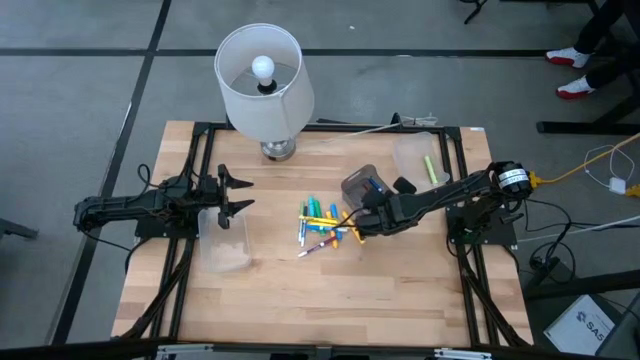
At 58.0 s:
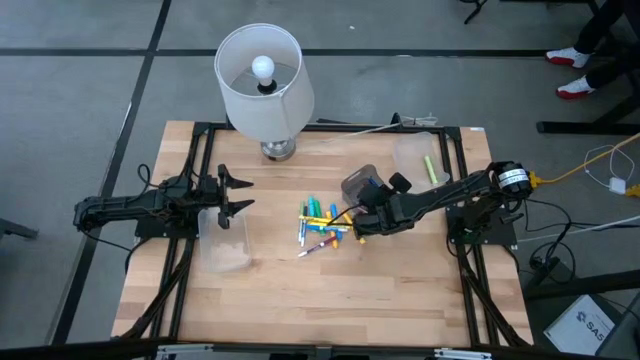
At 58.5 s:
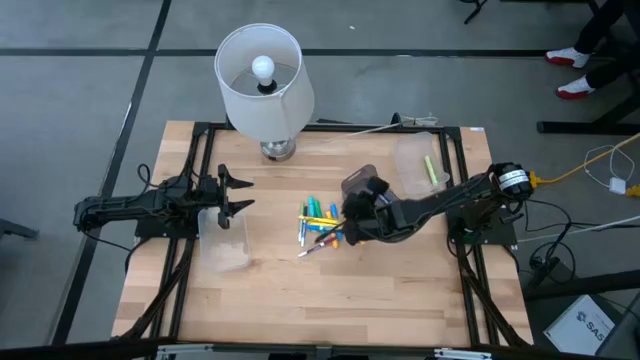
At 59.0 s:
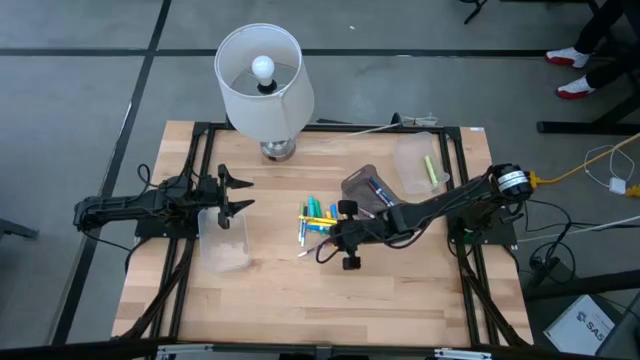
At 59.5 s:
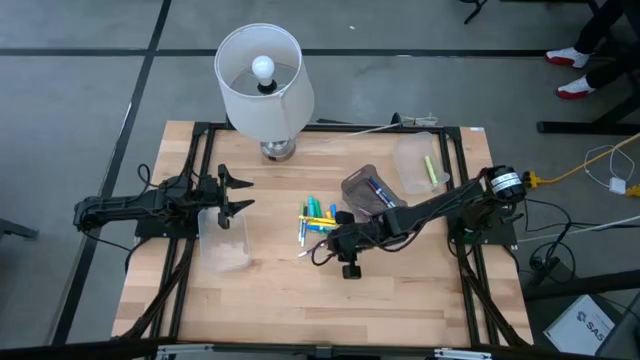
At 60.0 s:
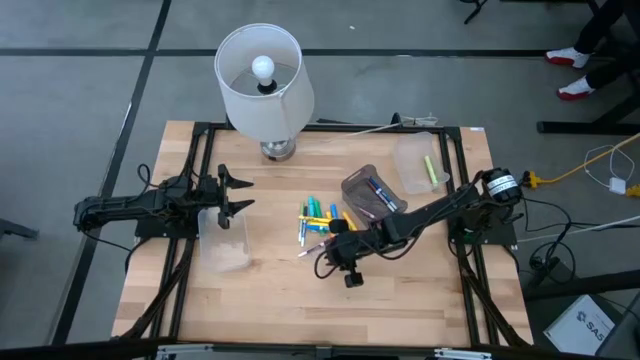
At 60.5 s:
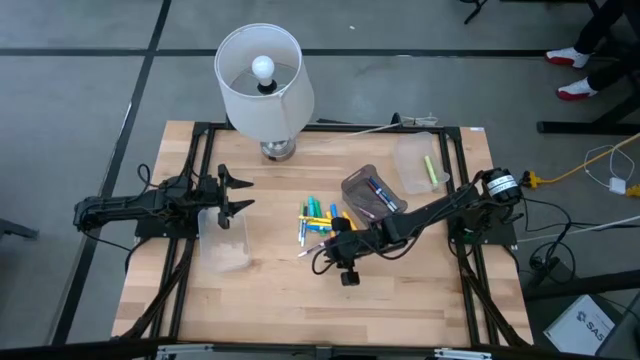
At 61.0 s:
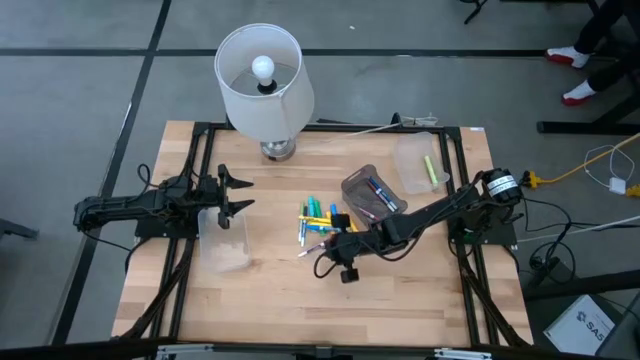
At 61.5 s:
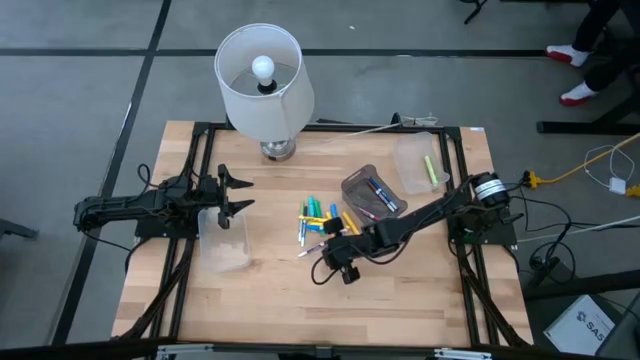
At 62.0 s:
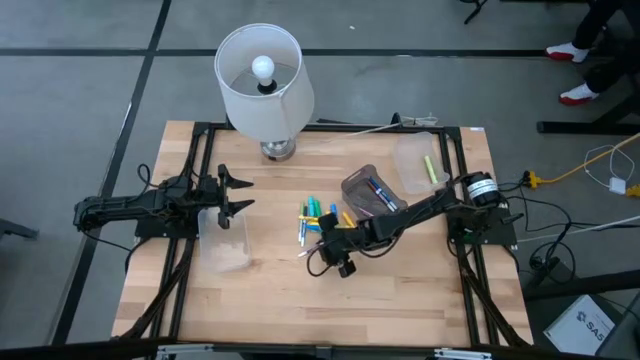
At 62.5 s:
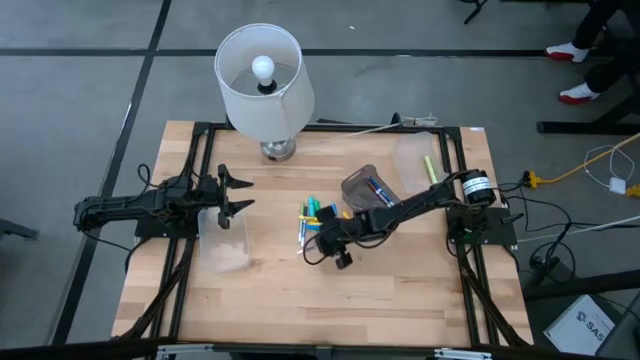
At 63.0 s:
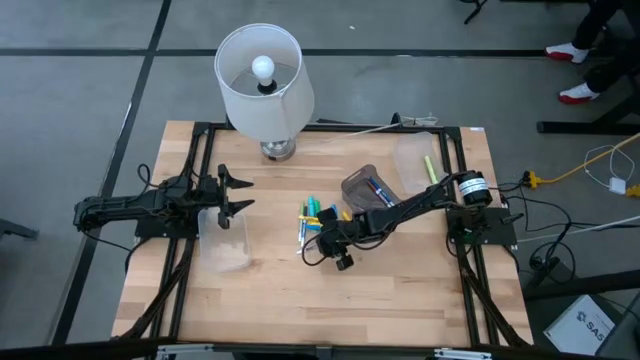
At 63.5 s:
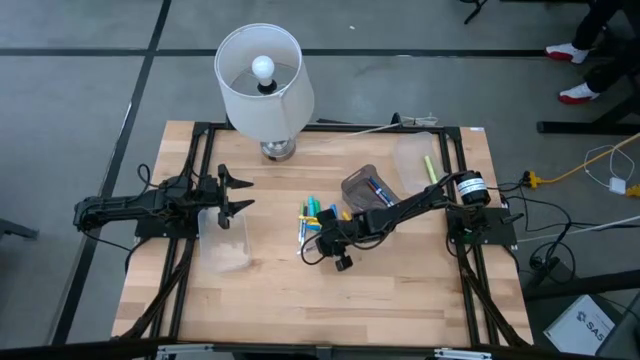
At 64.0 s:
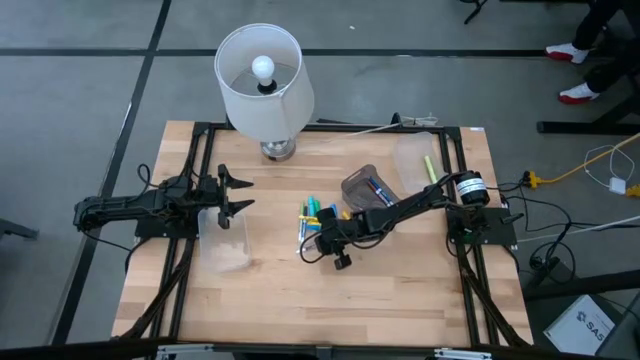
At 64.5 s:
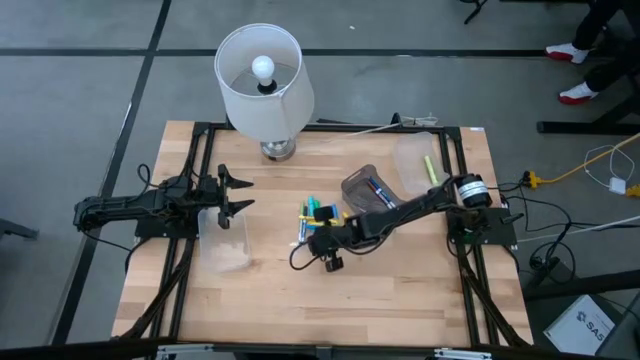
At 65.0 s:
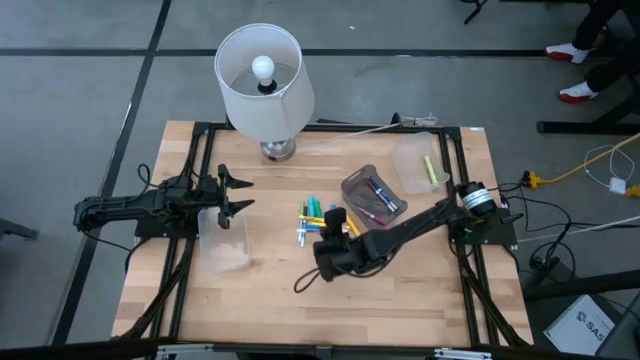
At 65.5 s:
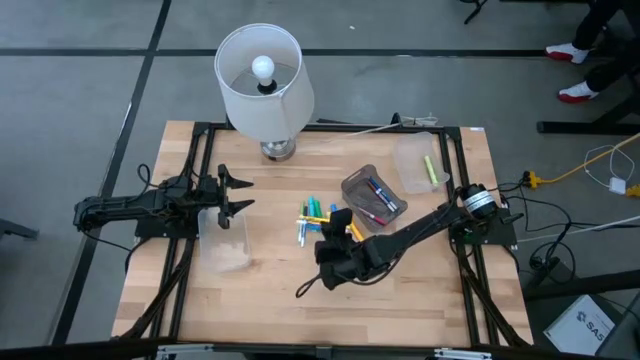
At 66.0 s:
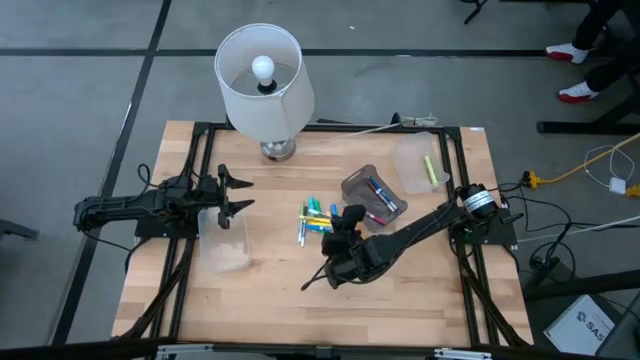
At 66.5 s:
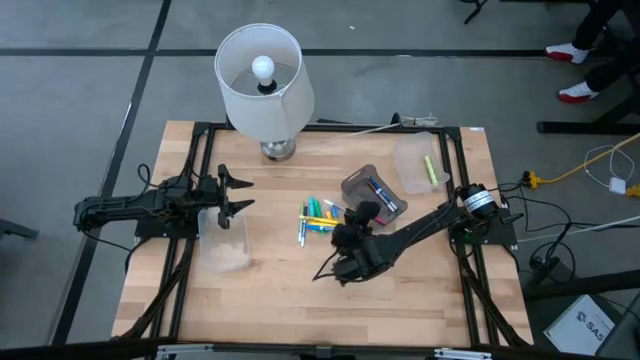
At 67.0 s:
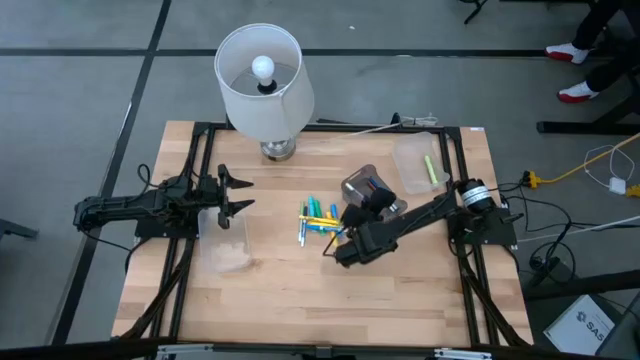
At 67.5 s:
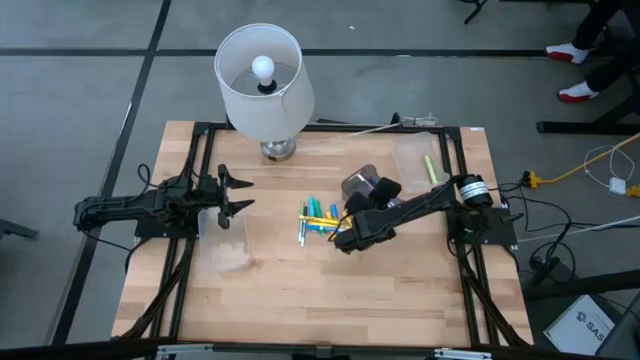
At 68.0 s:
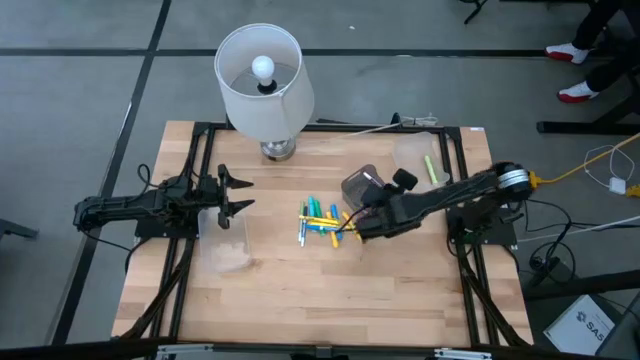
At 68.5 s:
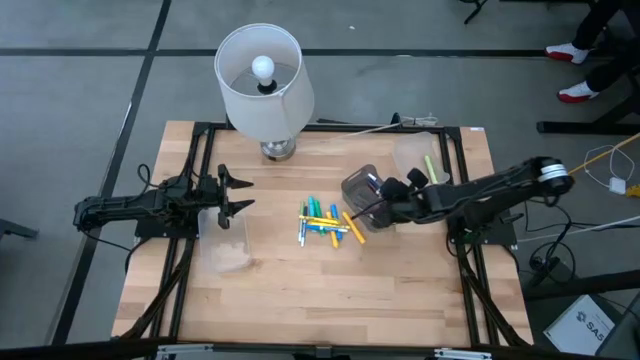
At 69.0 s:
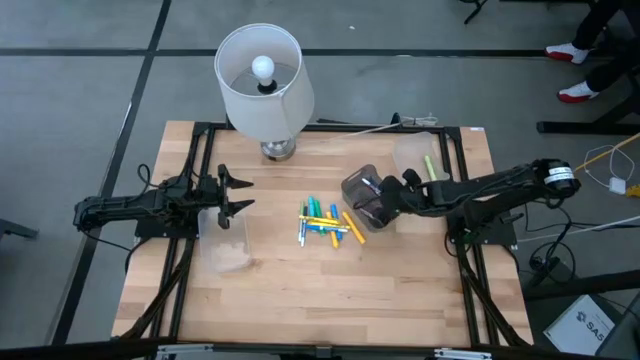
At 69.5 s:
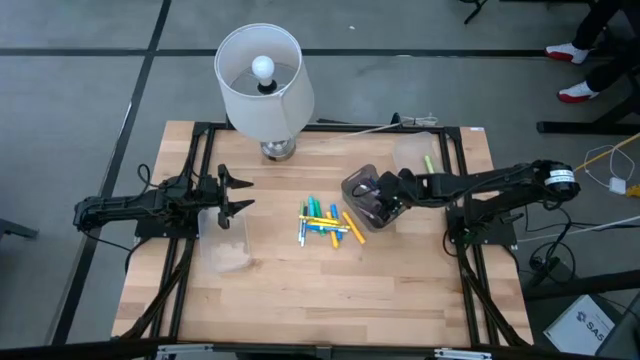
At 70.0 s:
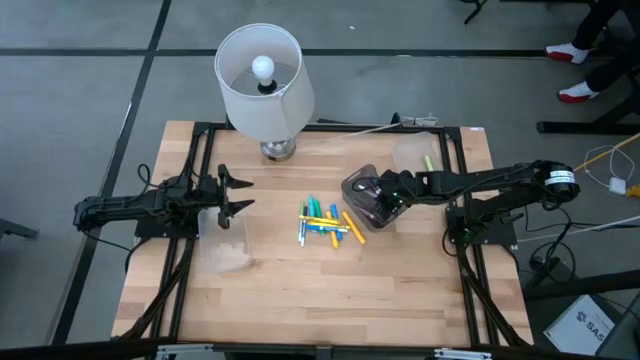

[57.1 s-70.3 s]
Task: Pick & Place Markers
Put the violet marker pen into the black bin

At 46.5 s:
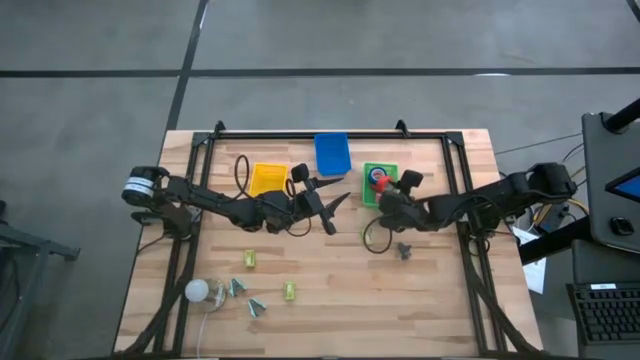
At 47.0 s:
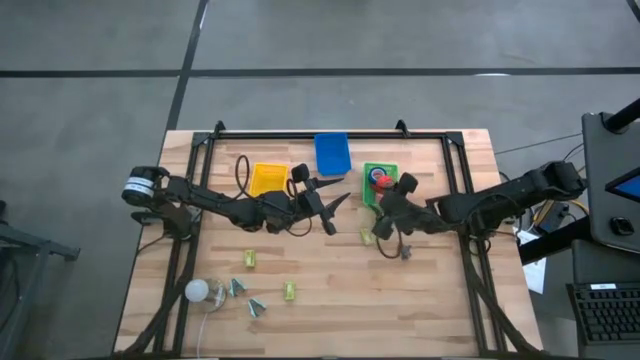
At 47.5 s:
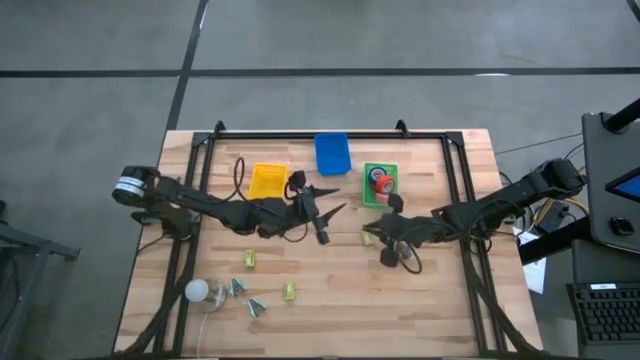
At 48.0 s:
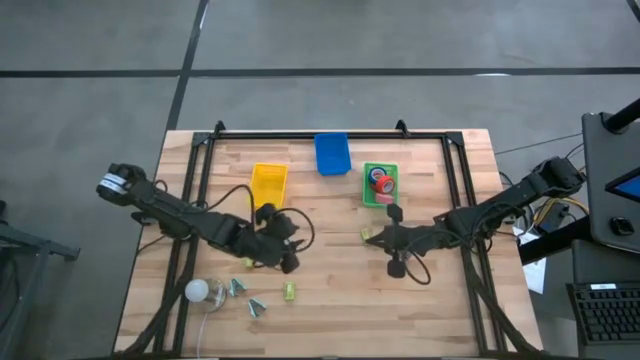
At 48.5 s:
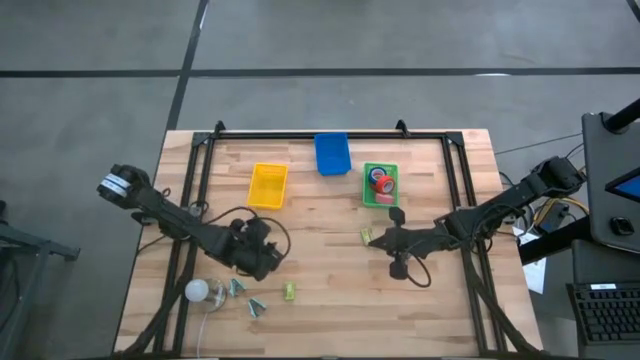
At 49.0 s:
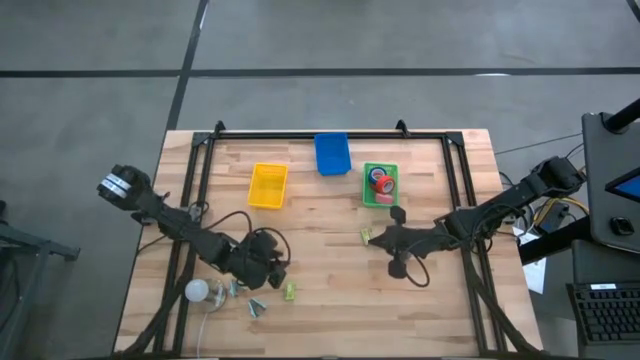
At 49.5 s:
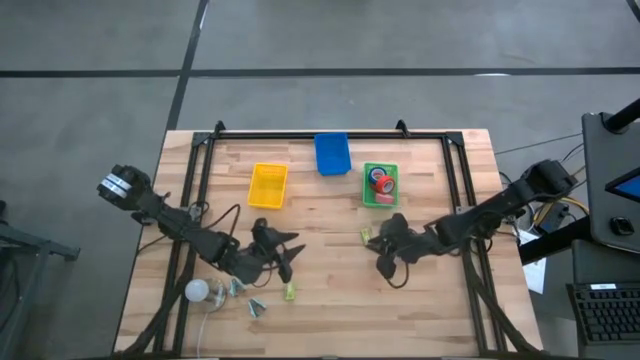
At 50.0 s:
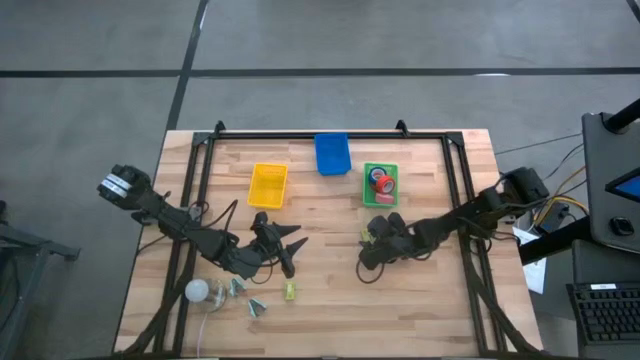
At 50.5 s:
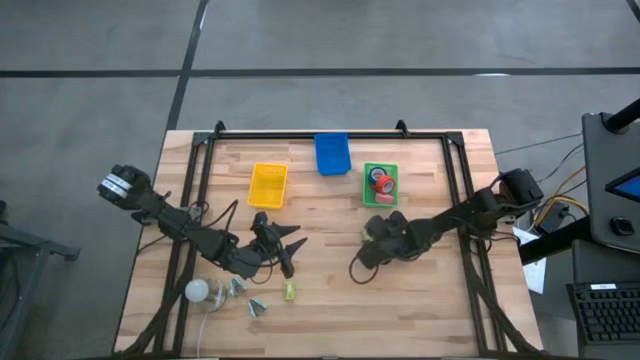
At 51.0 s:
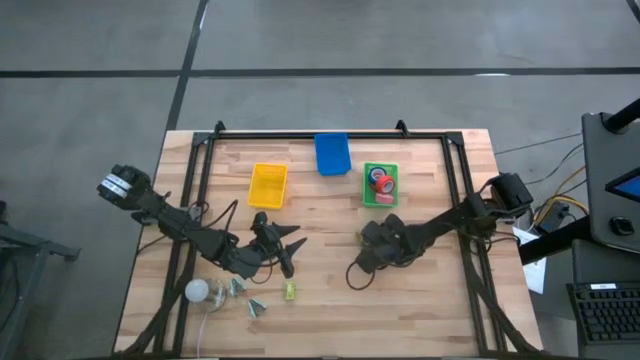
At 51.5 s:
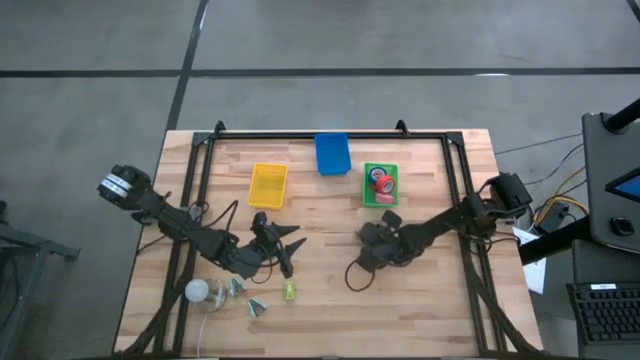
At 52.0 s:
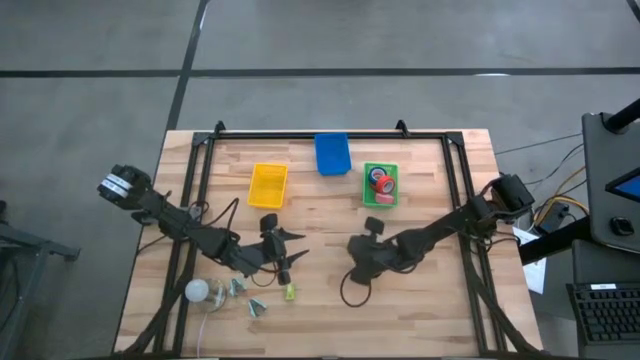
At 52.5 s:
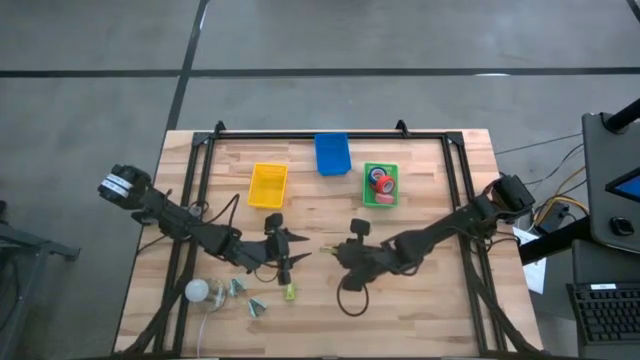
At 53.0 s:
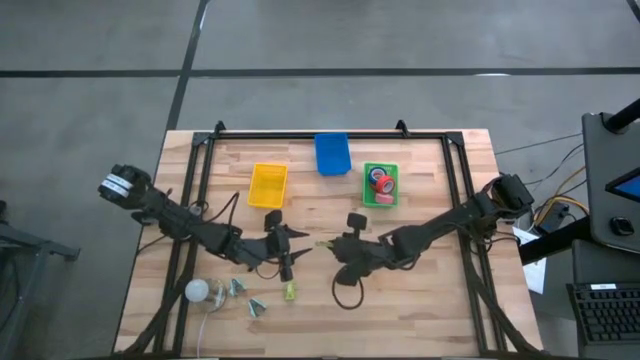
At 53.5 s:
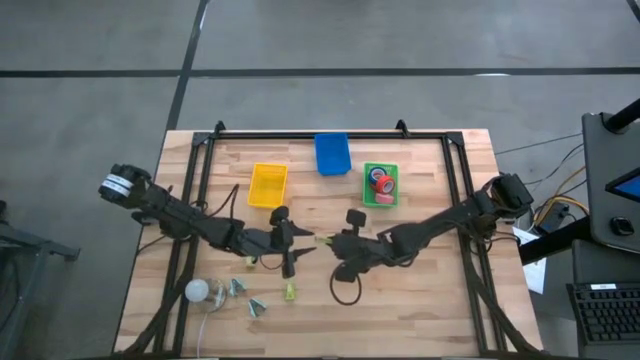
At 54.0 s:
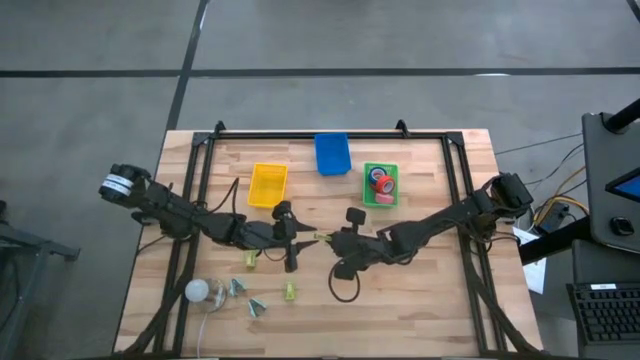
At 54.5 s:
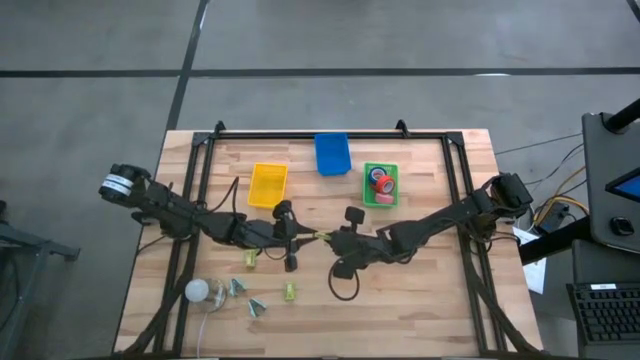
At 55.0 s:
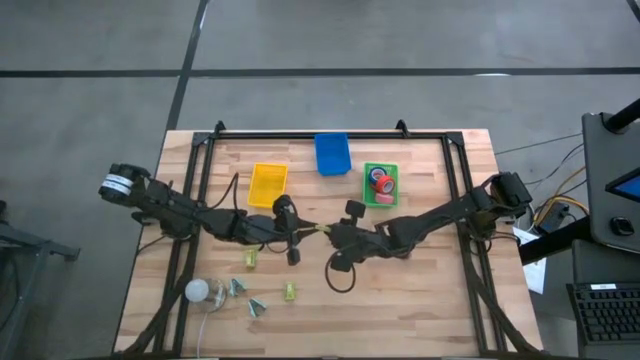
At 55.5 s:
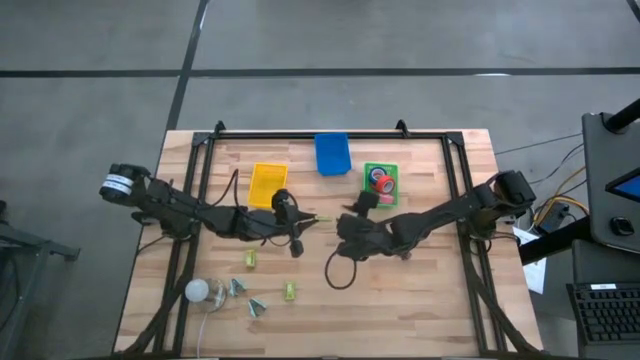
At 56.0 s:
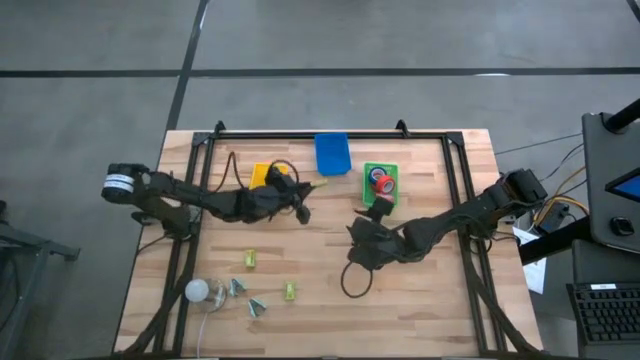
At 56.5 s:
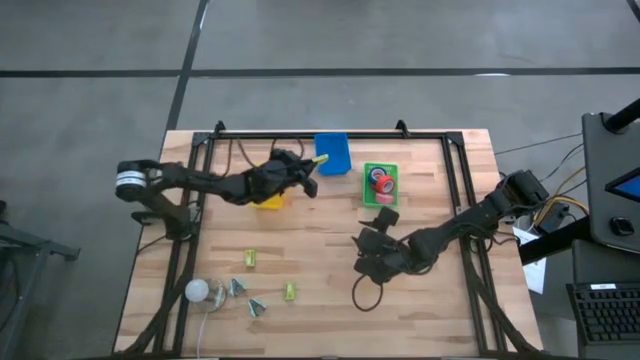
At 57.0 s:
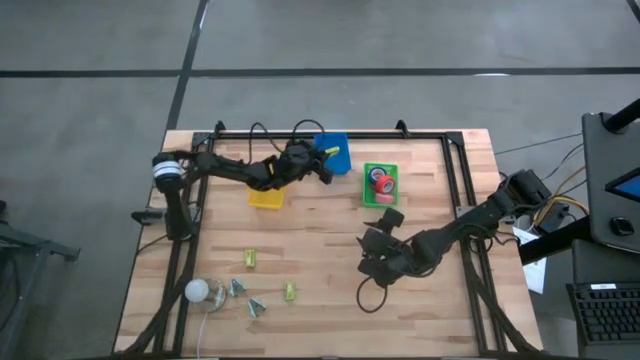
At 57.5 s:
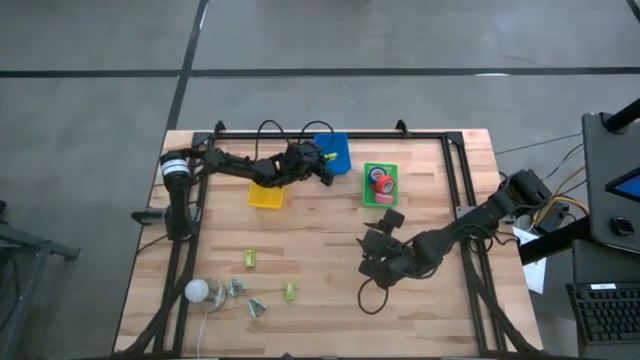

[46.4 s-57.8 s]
Task: Pick and place Stapler, Stapler remover, tape
Put the top right green staple box into the blue basket
